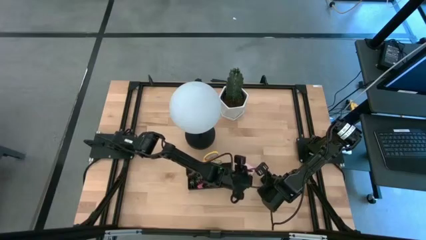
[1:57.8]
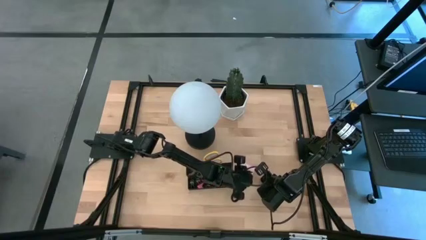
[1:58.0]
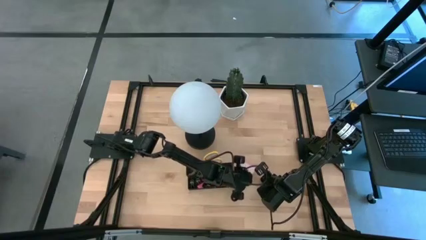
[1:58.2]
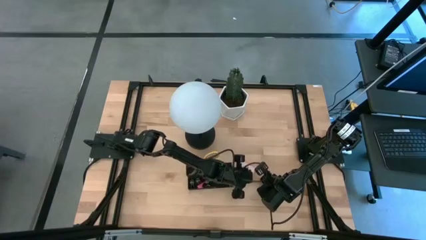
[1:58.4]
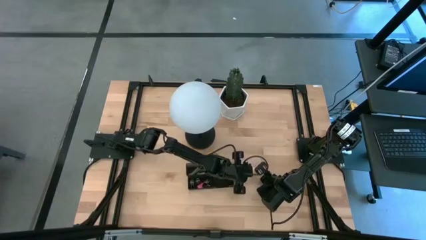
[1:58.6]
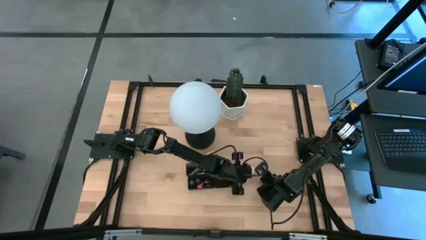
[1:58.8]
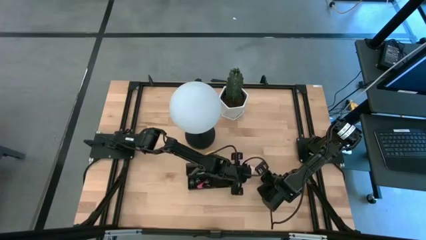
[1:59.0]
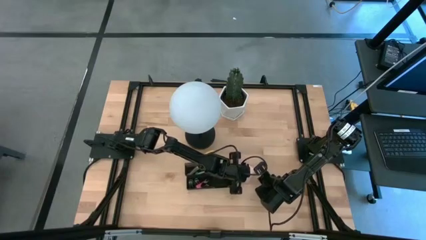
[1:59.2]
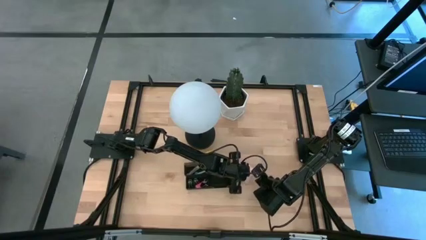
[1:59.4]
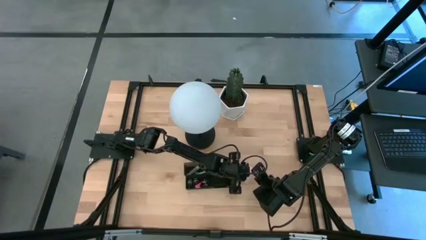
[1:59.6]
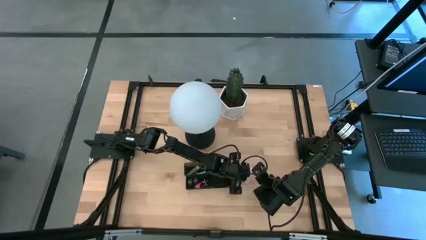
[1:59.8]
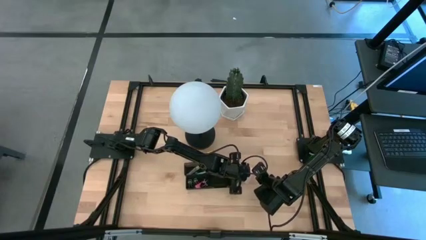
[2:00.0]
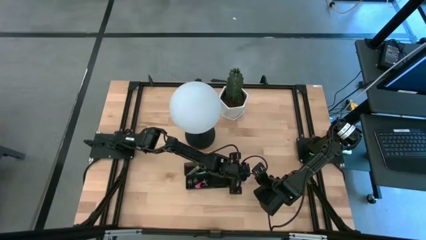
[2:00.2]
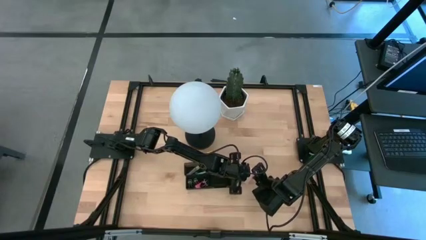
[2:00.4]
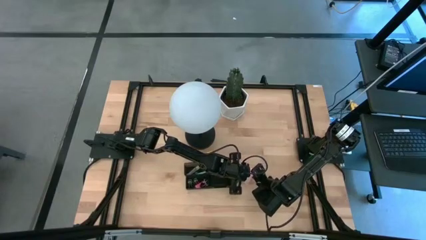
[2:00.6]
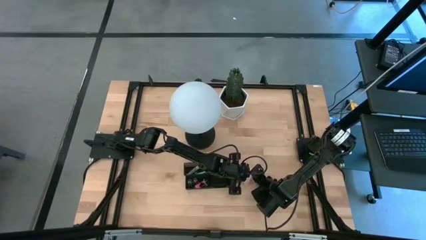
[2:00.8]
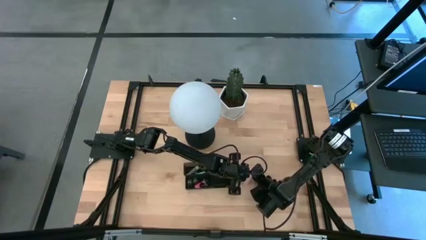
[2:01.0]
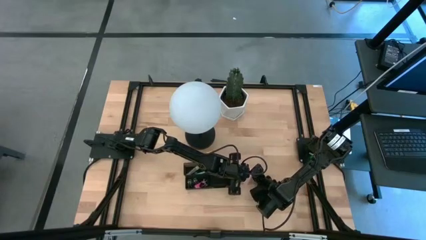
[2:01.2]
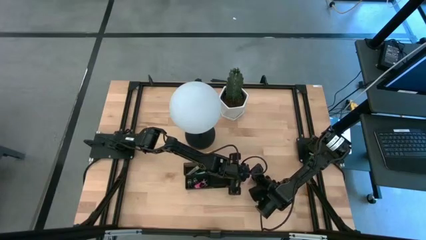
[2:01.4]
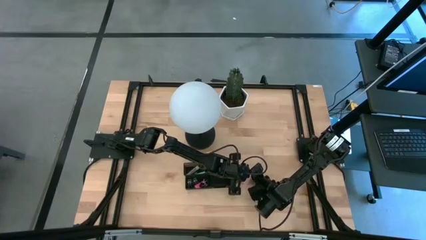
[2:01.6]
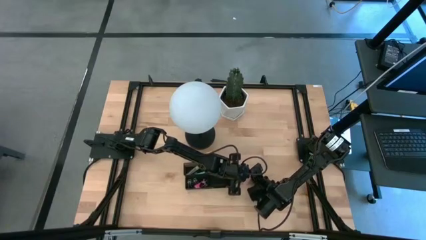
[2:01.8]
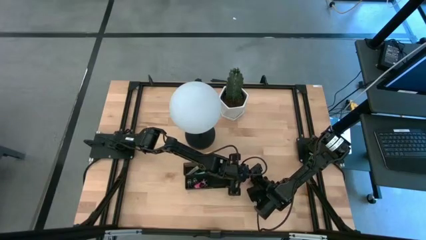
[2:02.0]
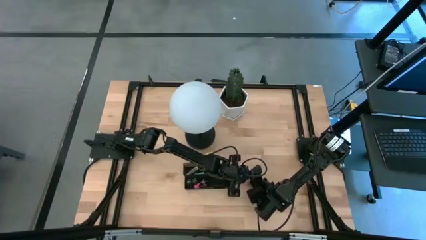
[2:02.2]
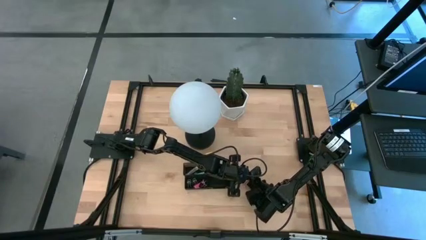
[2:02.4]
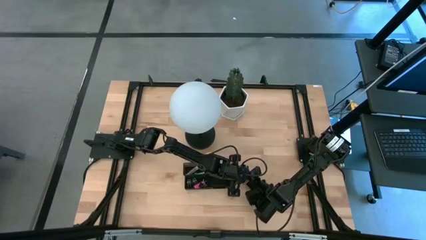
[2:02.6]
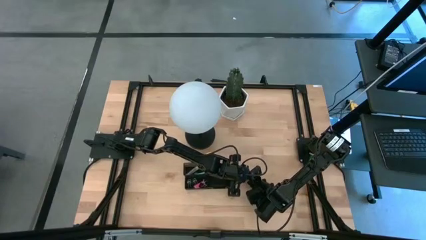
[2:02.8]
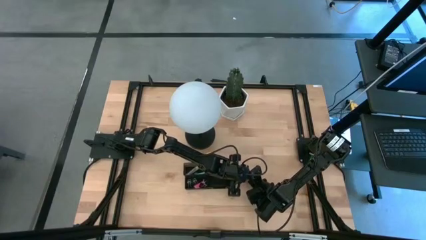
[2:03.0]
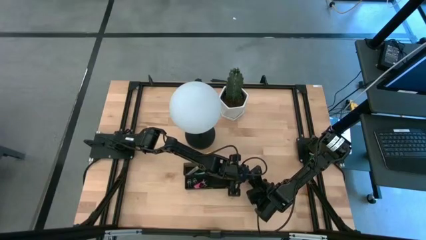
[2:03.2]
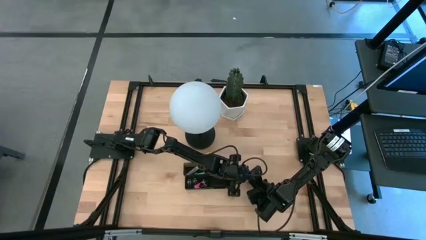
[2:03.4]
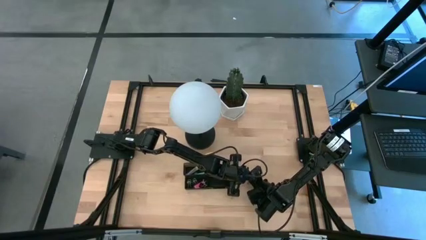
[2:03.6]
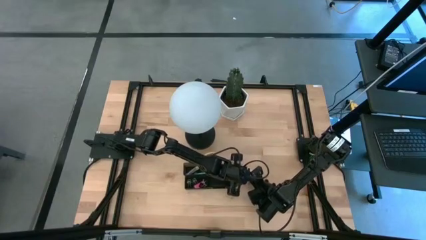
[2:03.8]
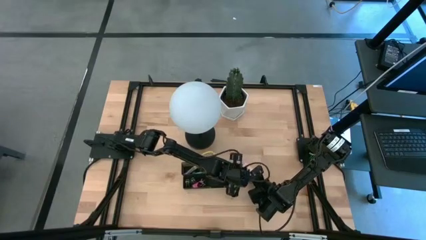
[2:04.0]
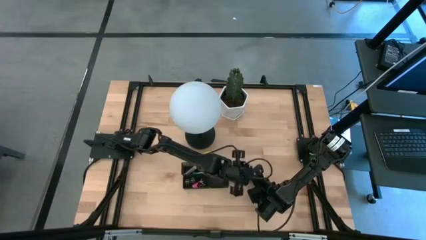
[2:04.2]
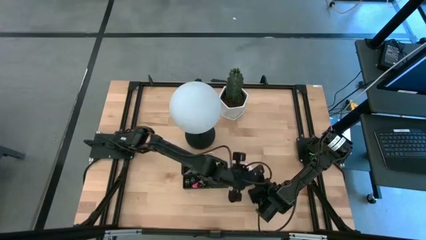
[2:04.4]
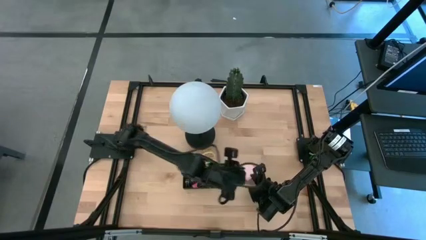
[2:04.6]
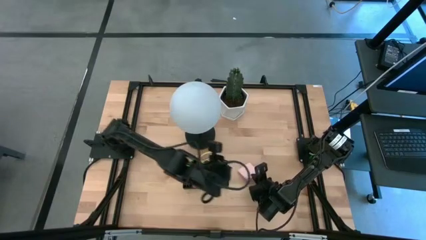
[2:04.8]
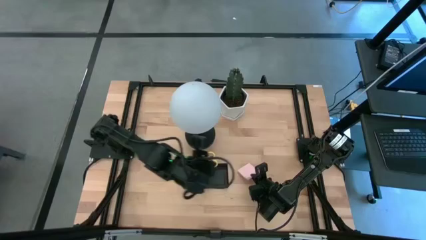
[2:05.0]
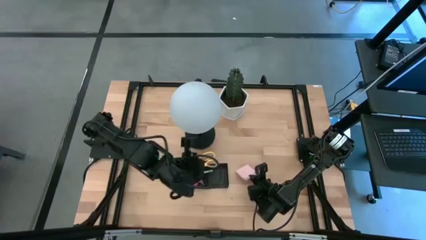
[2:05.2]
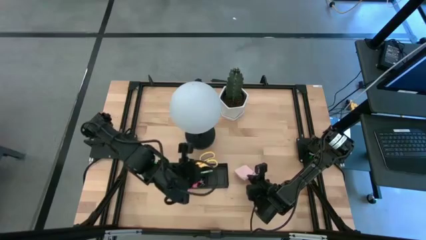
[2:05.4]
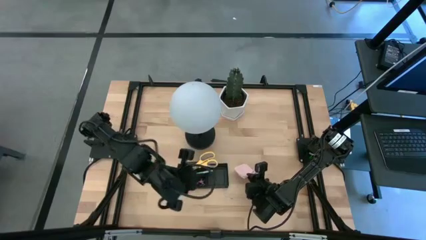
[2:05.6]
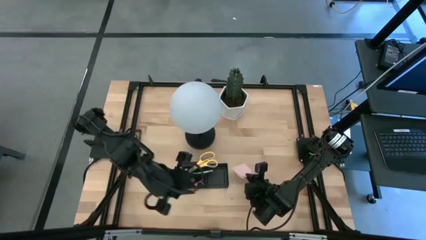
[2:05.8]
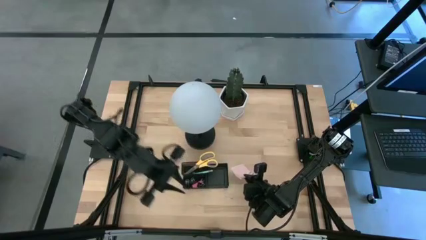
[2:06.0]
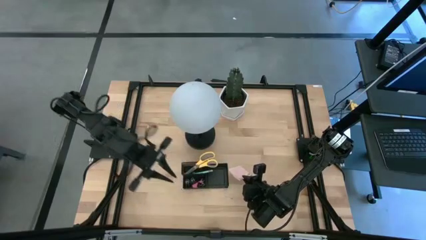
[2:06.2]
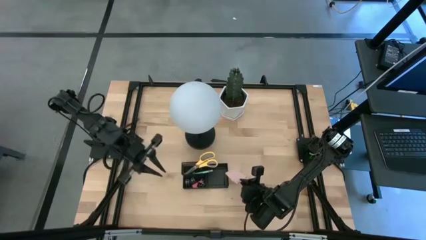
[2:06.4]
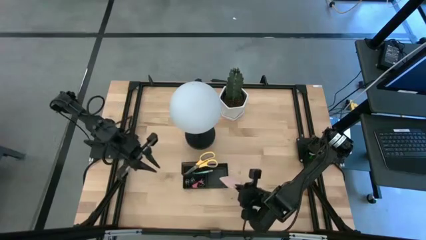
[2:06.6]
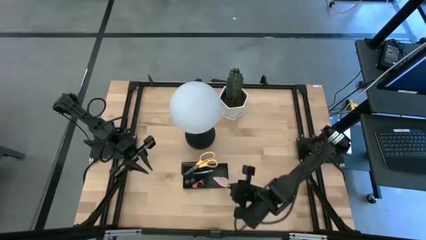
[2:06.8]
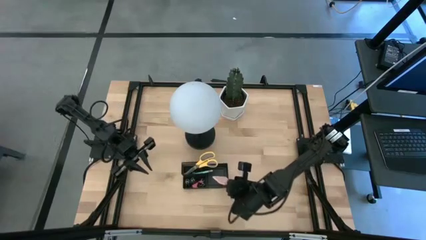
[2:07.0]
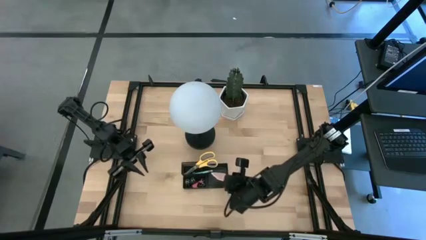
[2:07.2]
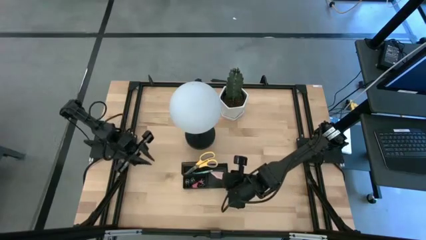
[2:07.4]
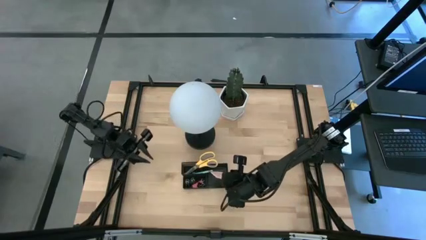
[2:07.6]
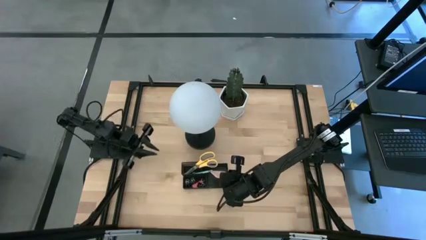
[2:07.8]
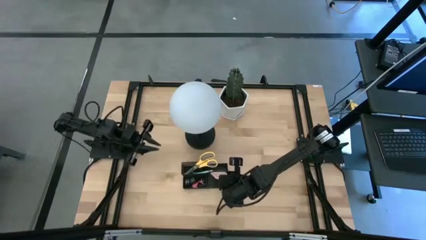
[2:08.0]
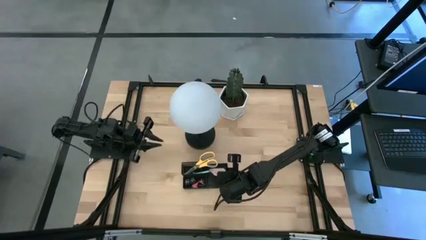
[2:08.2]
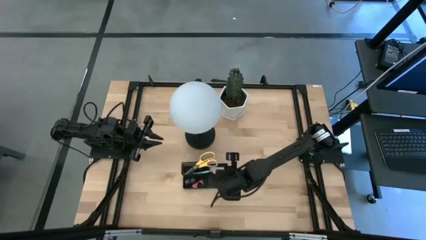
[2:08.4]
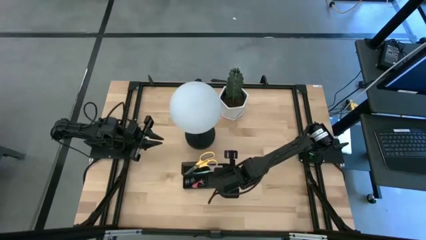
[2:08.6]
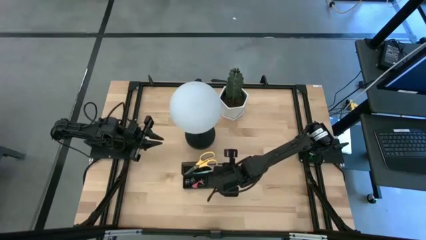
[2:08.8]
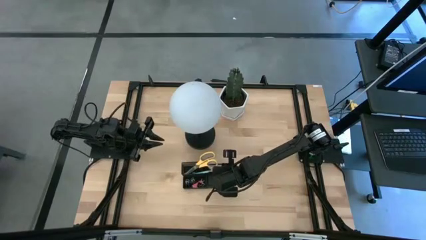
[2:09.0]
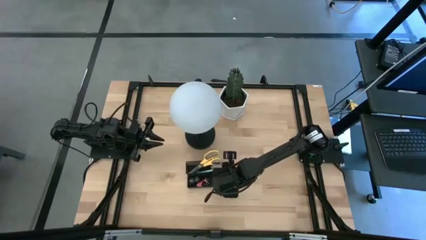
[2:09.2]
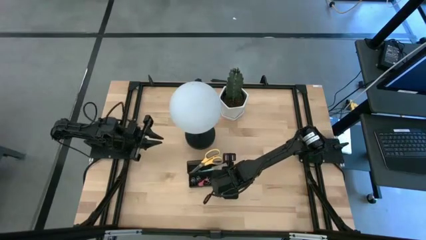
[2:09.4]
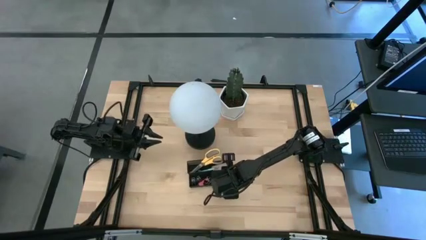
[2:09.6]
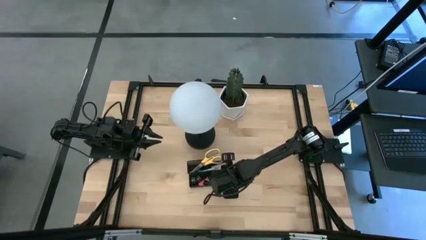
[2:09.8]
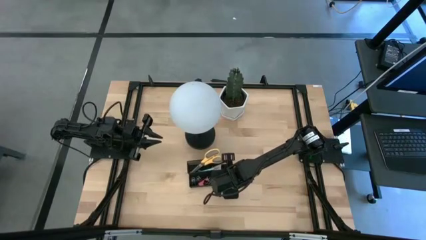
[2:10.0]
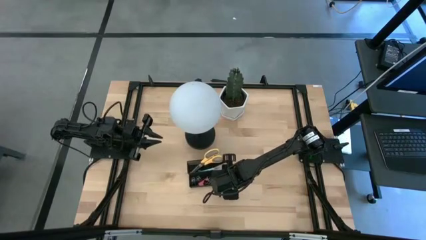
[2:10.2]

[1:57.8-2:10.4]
Task: Pick and place office supplies into organizer
Put the pink sticky notes into the desk organizer
